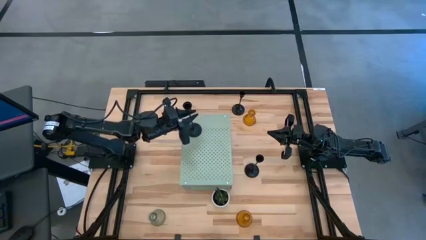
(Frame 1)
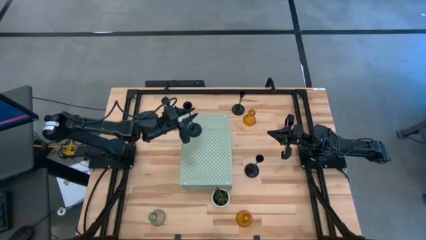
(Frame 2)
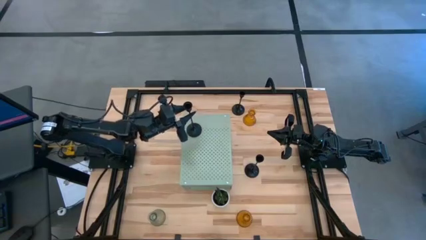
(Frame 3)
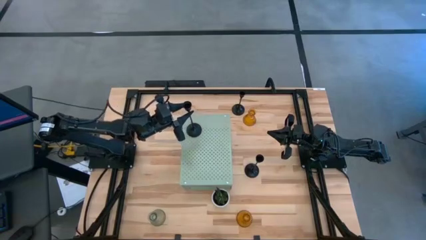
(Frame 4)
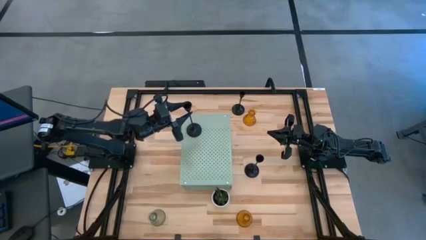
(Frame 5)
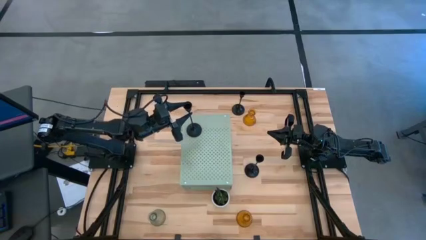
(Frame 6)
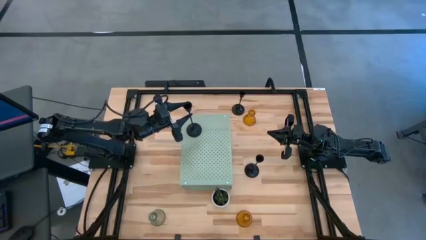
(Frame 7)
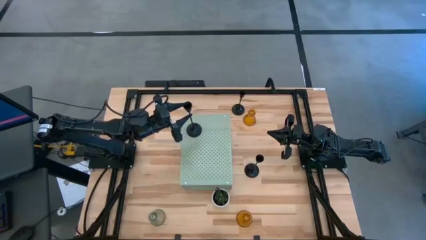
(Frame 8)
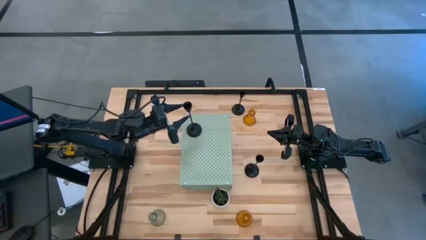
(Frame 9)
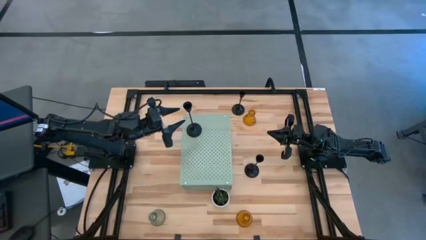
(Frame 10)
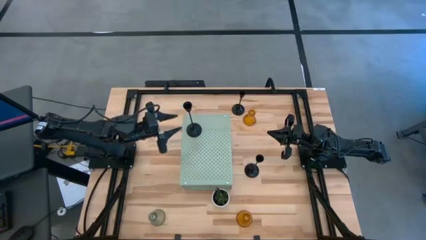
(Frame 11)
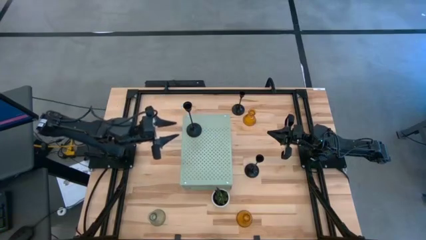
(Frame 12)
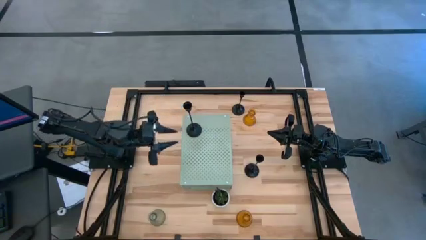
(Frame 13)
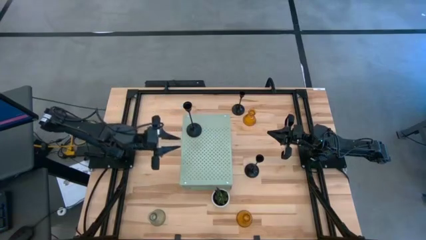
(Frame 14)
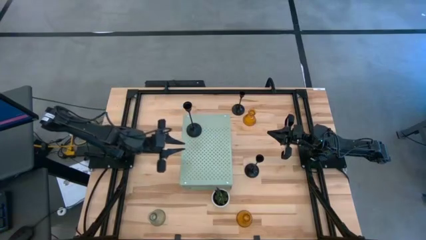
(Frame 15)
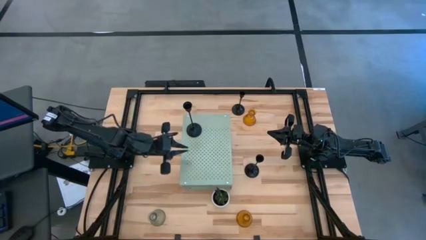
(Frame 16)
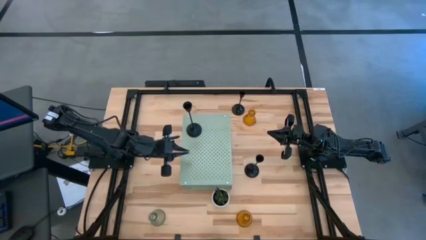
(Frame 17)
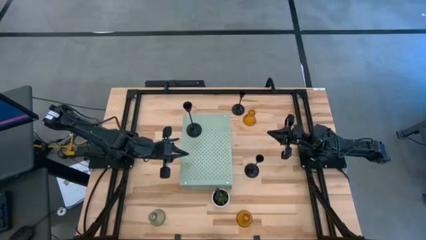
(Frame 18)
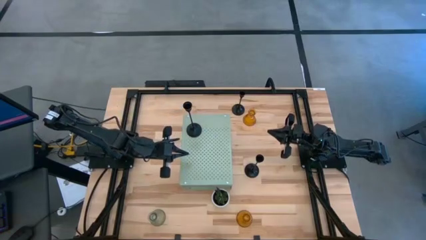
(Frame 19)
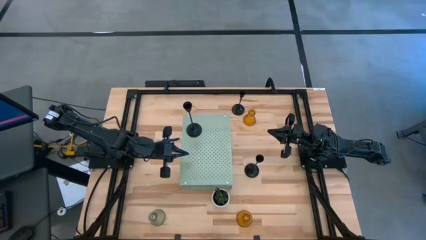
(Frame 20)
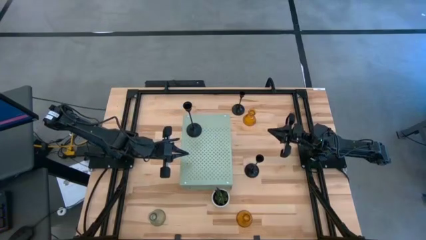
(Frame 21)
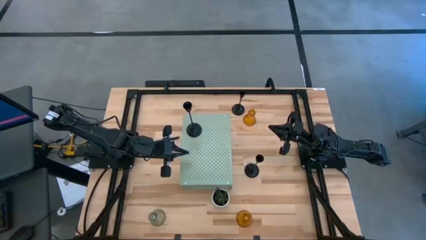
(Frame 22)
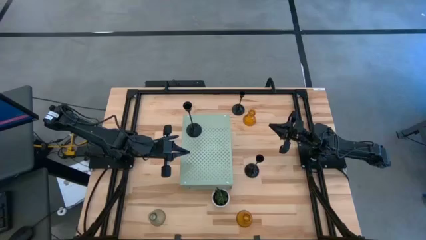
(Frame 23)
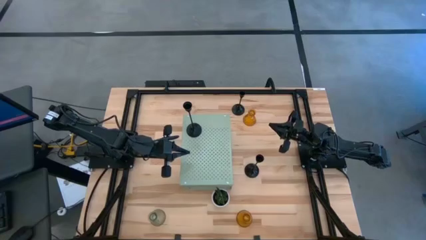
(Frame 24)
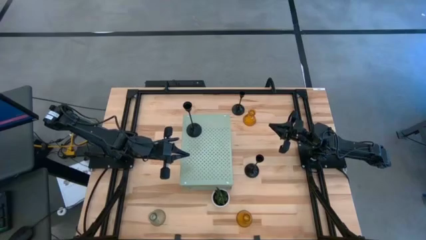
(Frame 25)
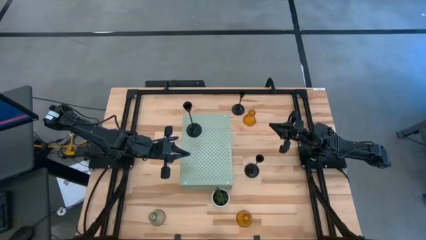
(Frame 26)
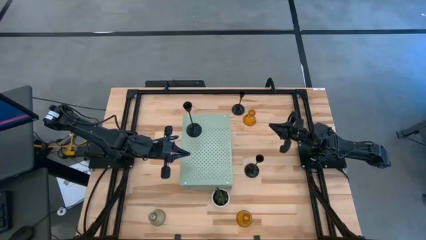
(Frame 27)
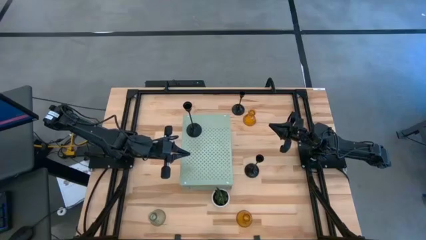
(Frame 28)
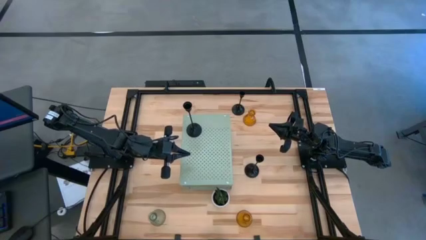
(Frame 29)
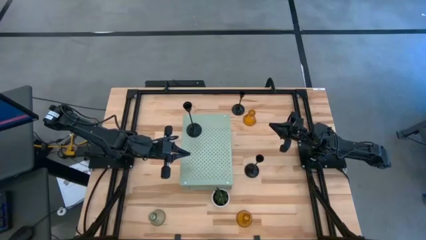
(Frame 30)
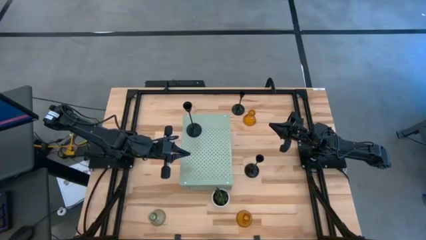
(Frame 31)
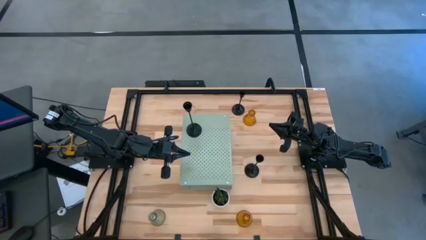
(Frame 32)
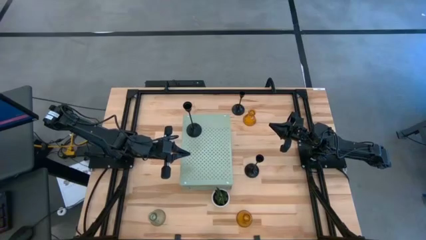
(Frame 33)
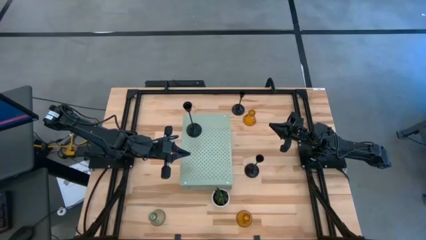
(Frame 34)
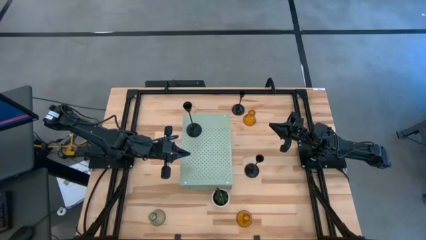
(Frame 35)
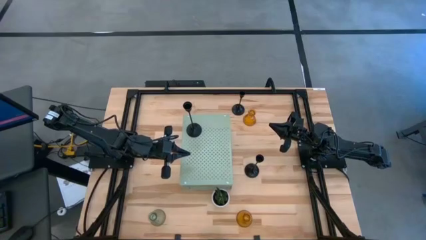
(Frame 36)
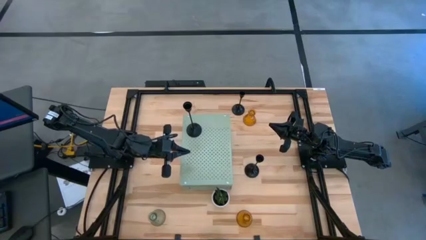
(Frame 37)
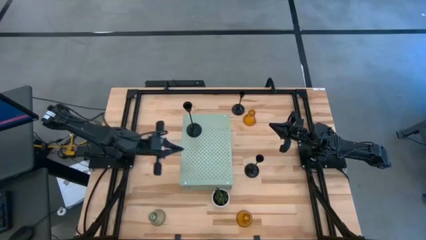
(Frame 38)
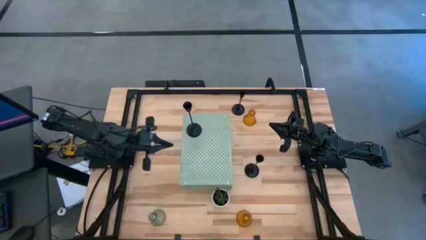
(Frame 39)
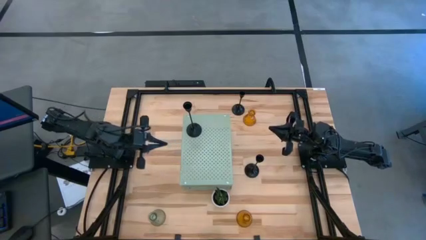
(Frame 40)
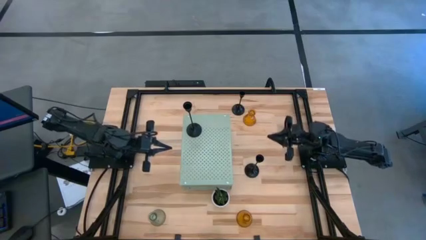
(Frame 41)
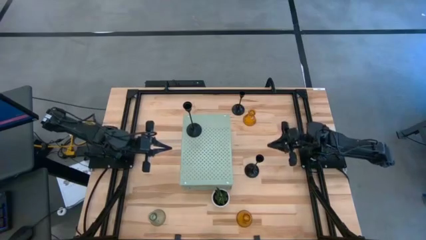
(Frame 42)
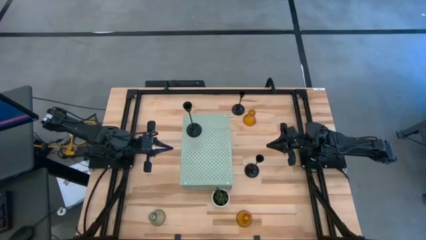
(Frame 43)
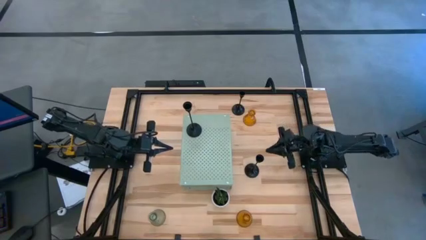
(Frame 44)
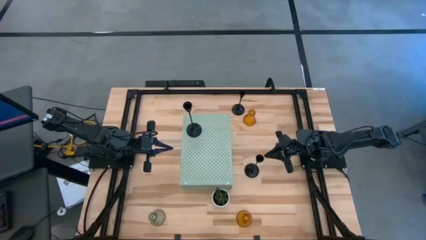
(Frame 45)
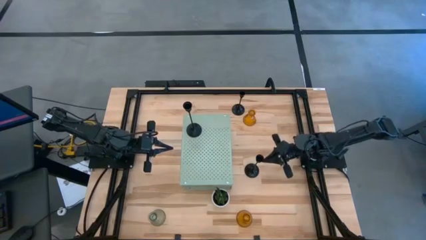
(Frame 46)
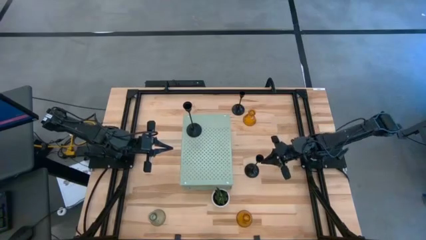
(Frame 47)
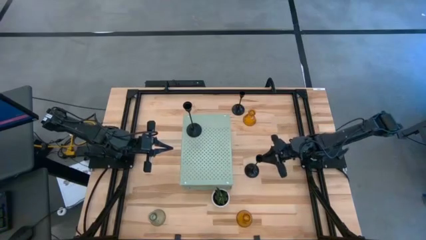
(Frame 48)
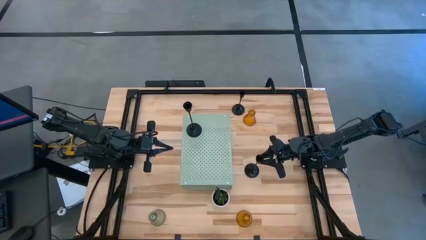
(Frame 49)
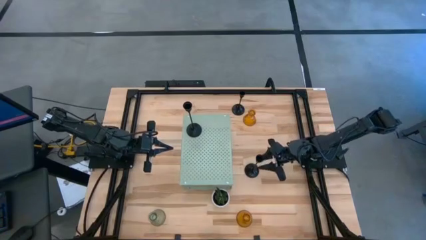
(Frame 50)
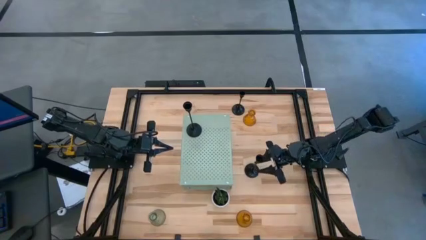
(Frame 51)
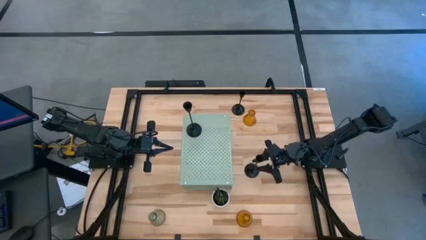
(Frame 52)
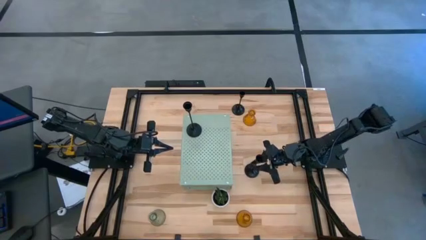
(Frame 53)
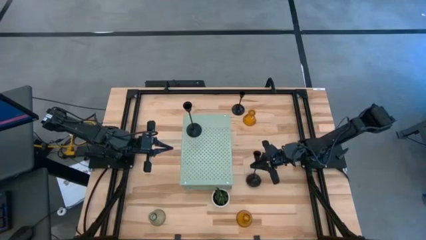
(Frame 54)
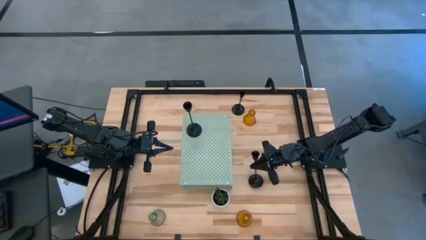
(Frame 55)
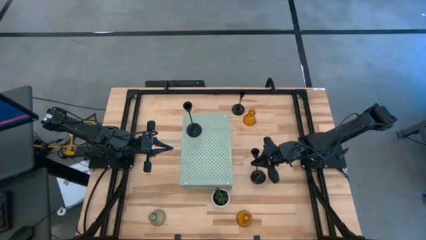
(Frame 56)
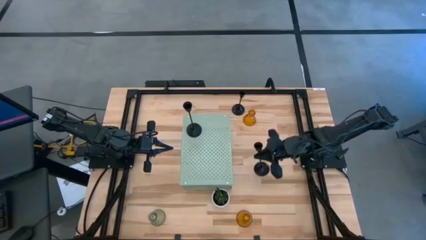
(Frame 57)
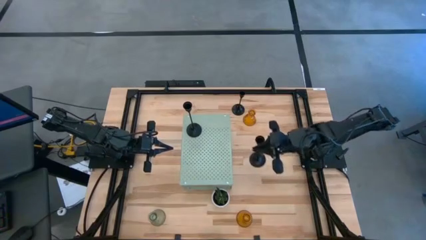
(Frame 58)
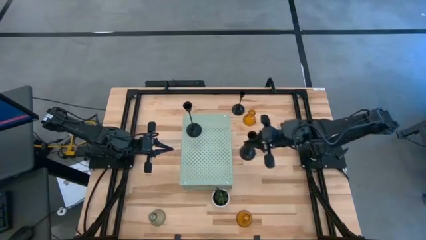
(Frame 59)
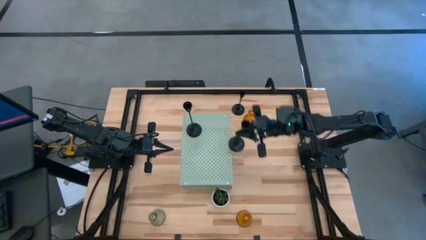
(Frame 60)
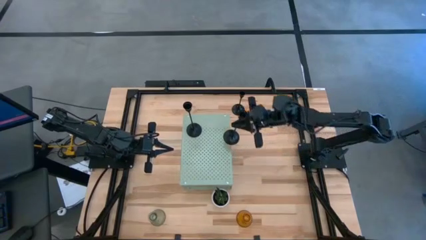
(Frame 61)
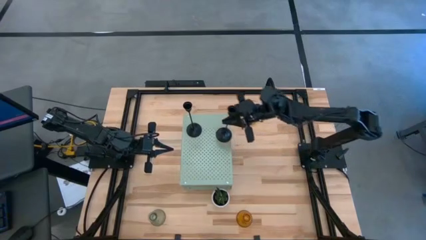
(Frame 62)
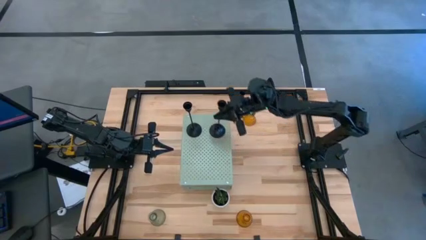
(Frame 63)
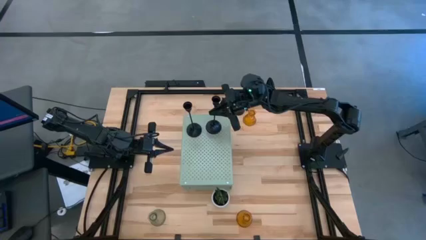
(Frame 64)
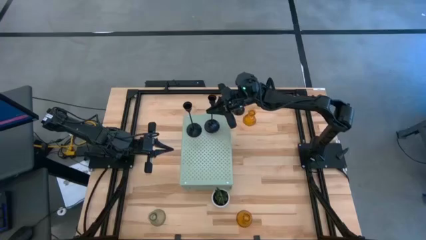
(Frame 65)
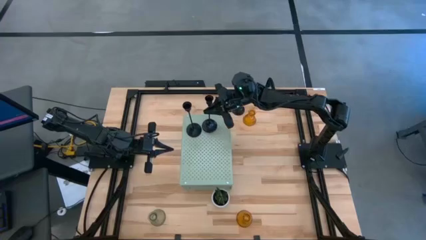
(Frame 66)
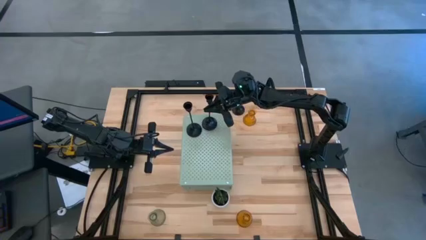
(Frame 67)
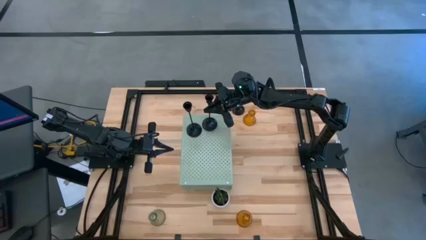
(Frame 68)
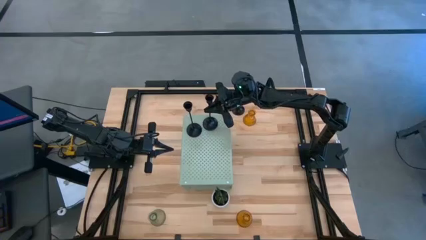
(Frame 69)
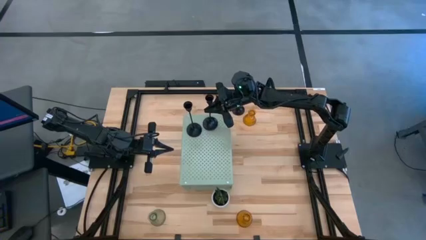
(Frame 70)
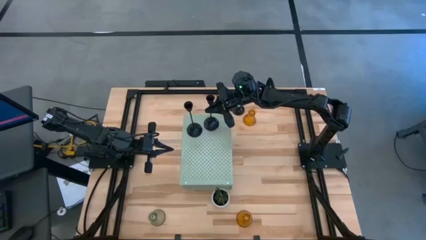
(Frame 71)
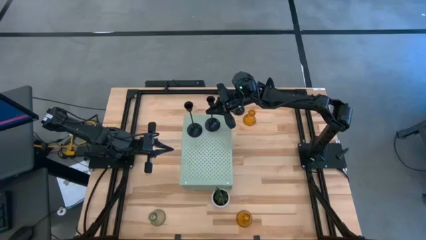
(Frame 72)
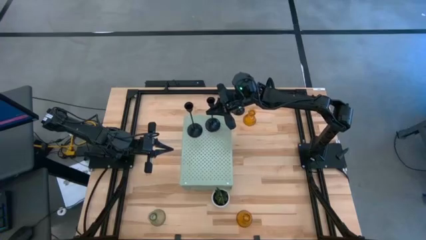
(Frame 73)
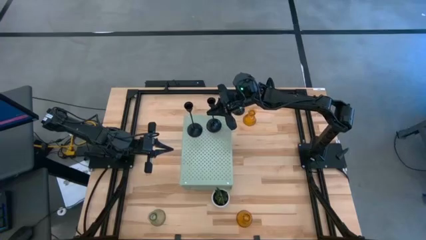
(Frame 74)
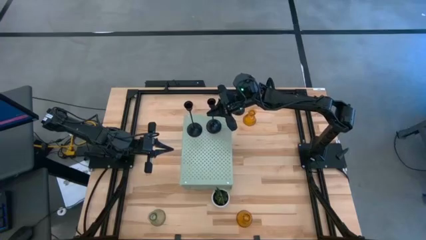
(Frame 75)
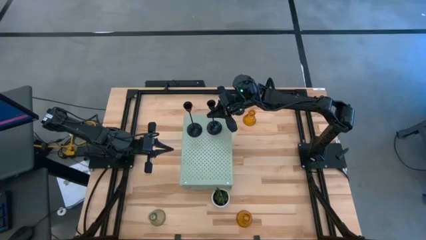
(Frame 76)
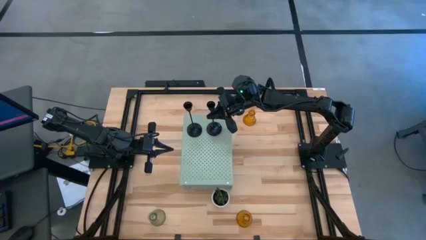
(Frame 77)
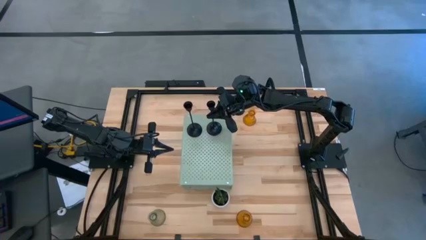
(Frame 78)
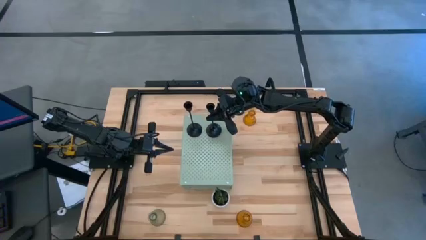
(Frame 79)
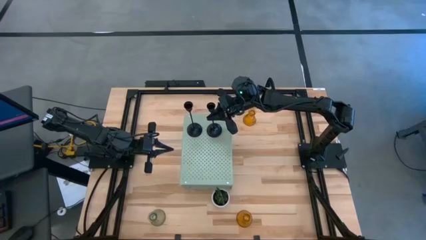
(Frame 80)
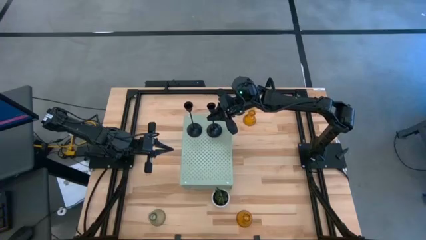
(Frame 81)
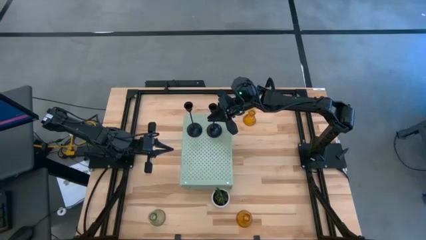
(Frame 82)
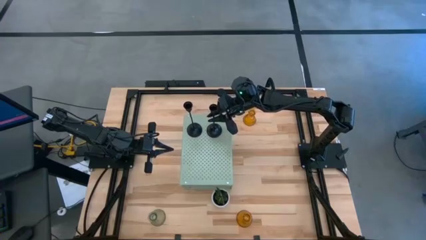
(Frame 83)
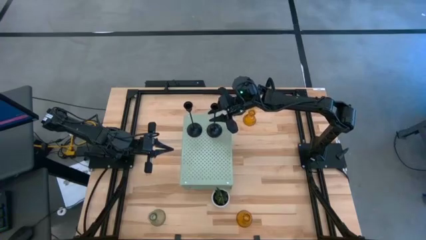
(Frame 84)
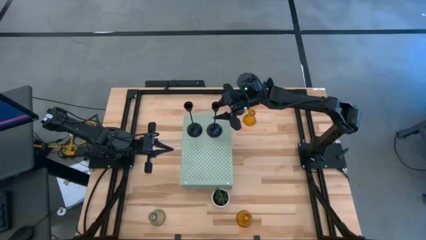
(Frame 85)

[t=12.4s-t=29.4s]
Task: Pick & Place candle stick holders
Put the bottom black candle holder on the shelf
